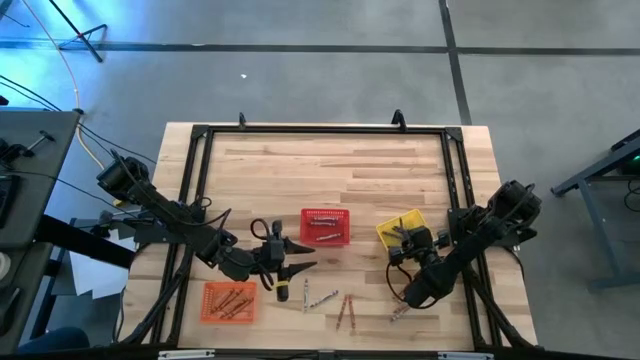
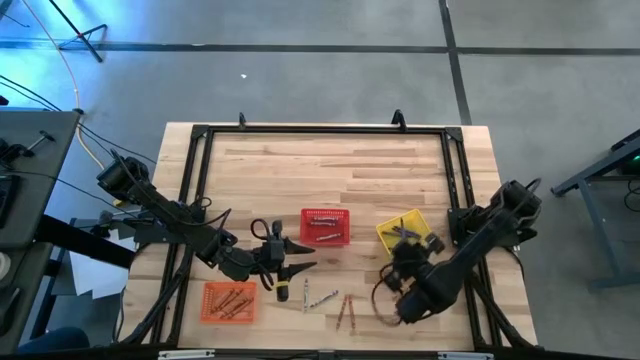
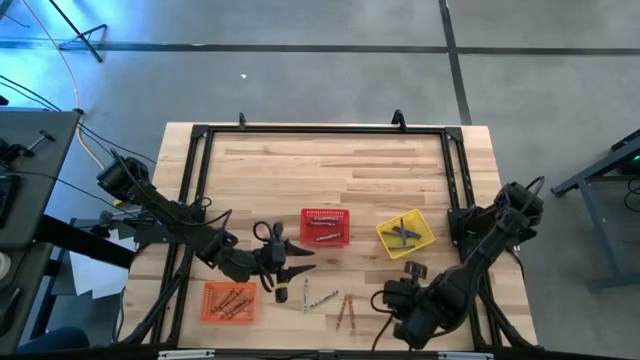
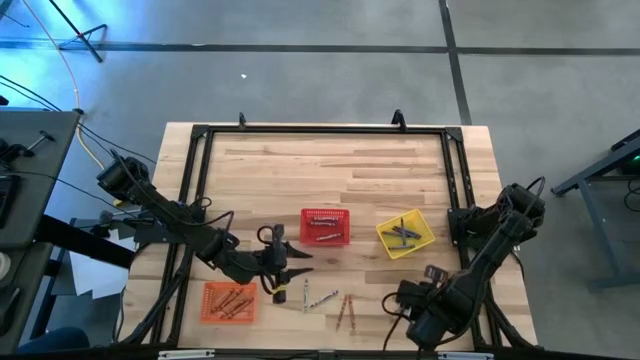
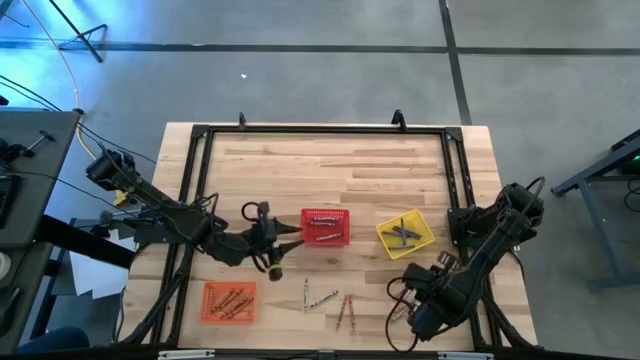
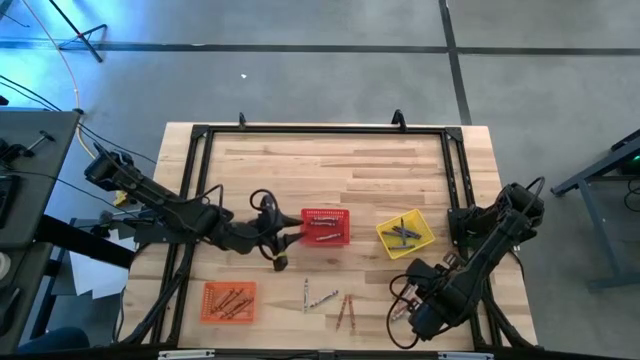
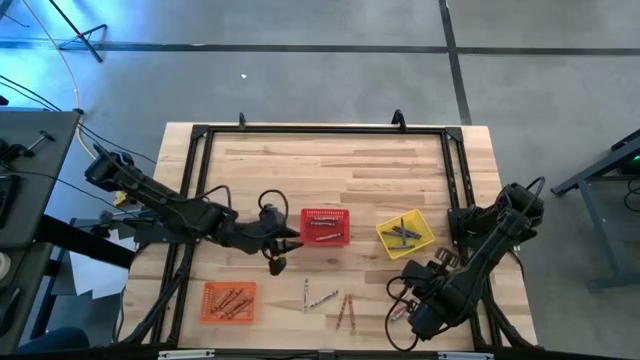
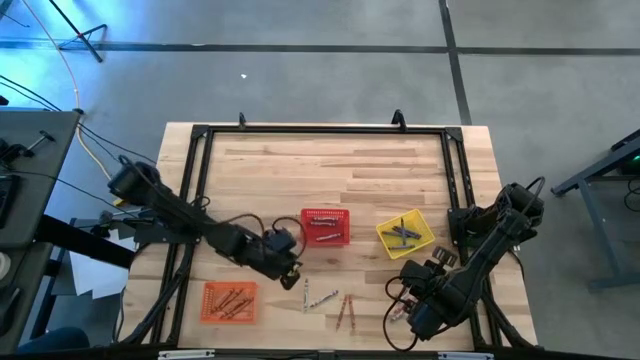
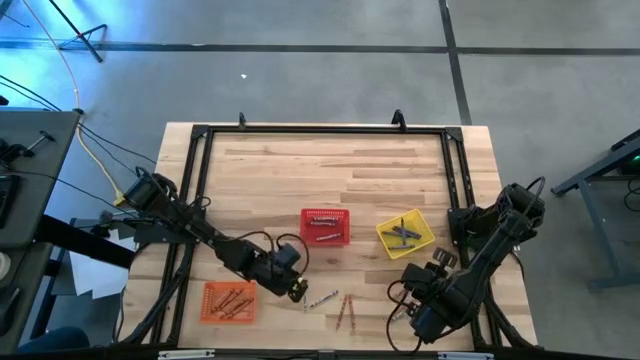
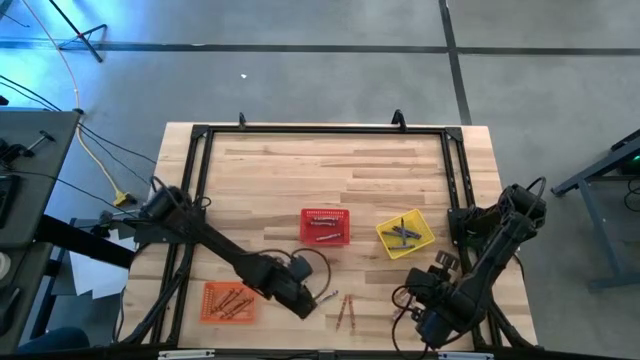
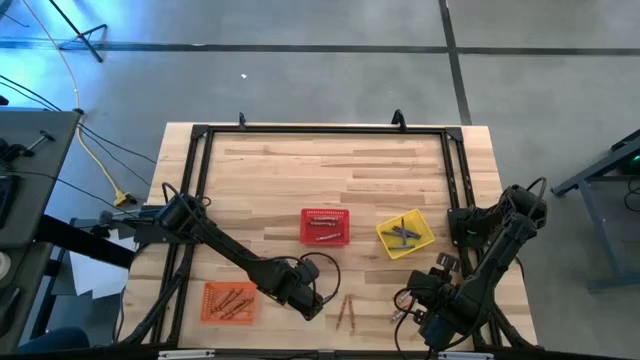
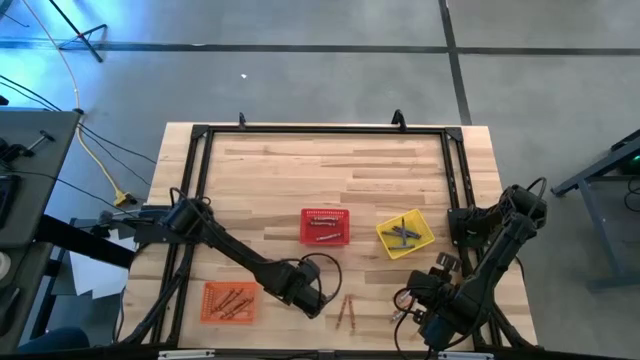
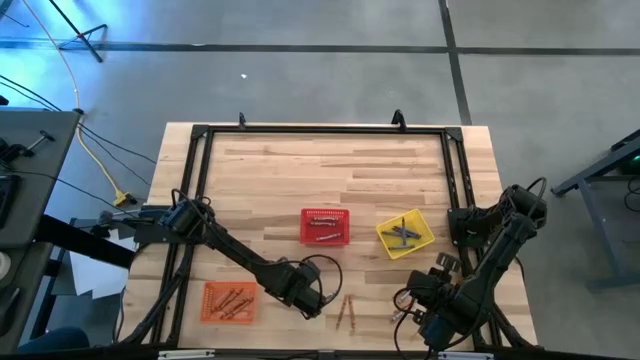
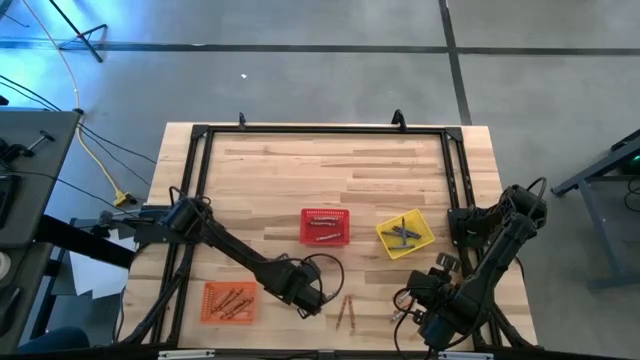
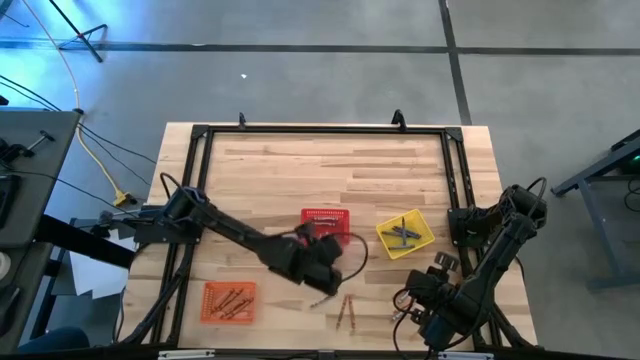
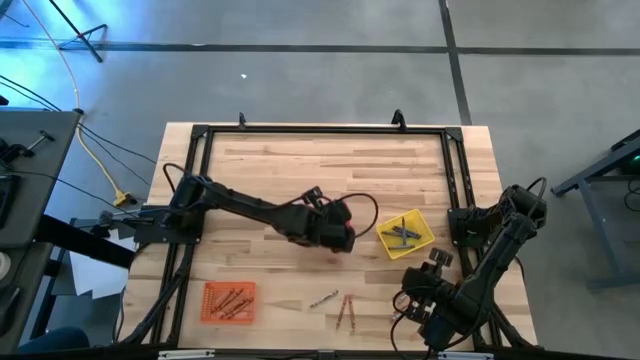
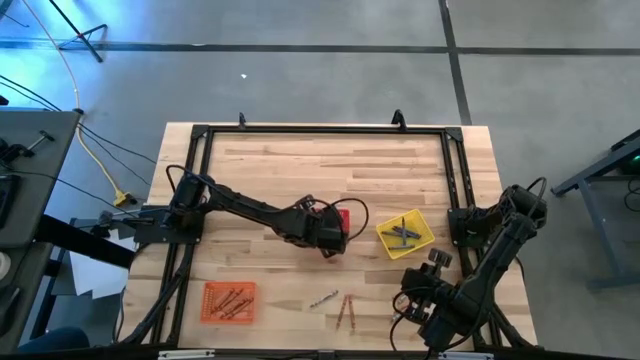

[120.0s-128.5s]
Task: Sort crayons
Put the gray crayon into the red bin

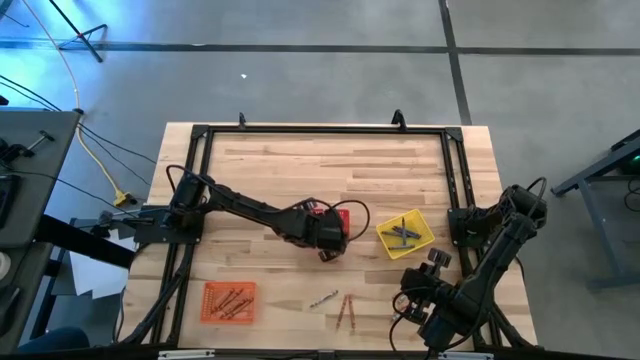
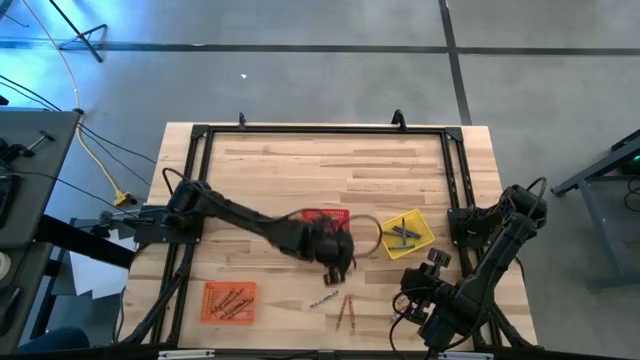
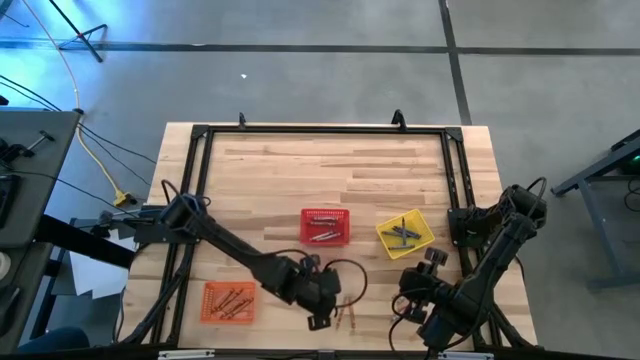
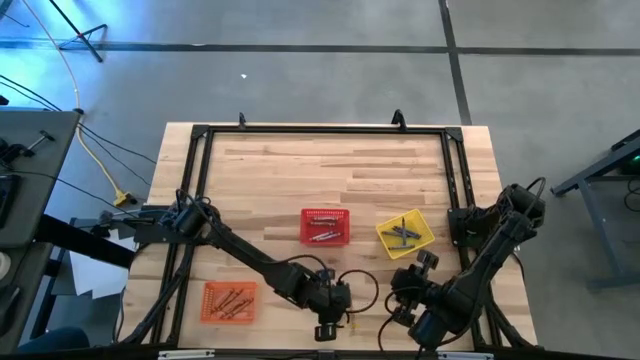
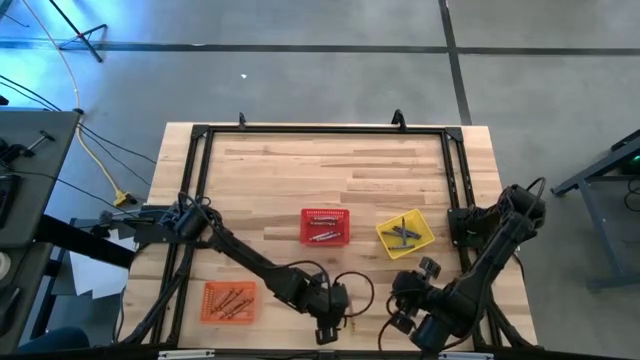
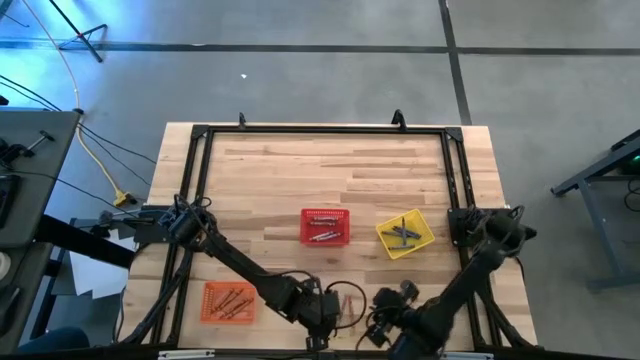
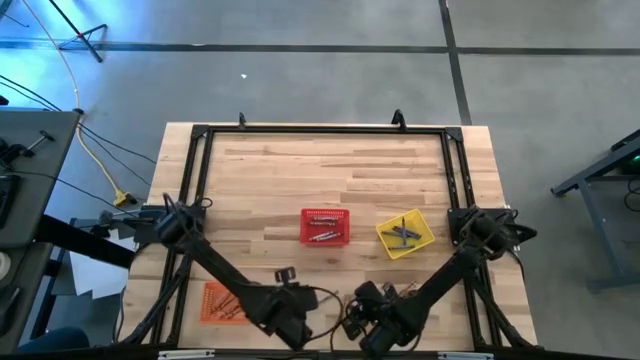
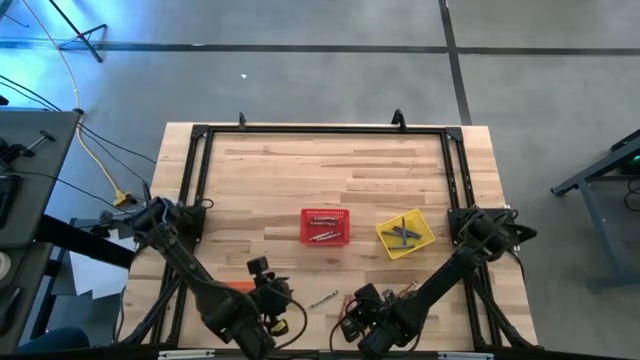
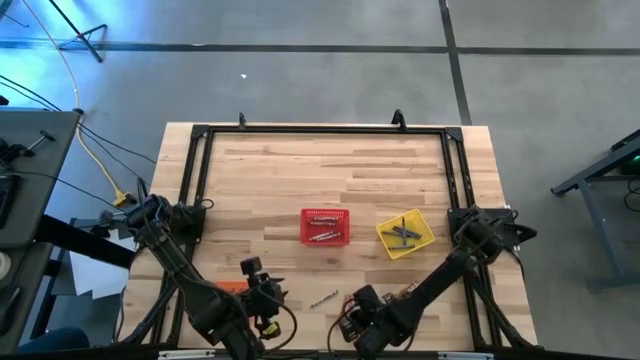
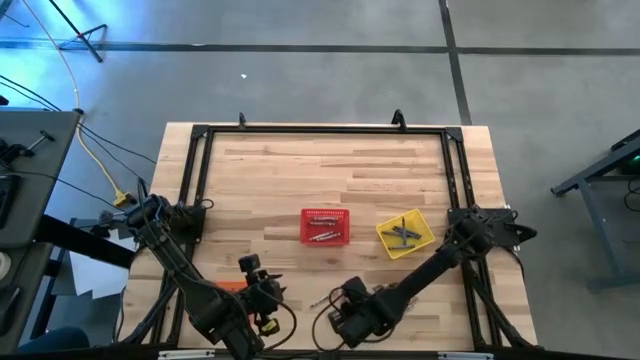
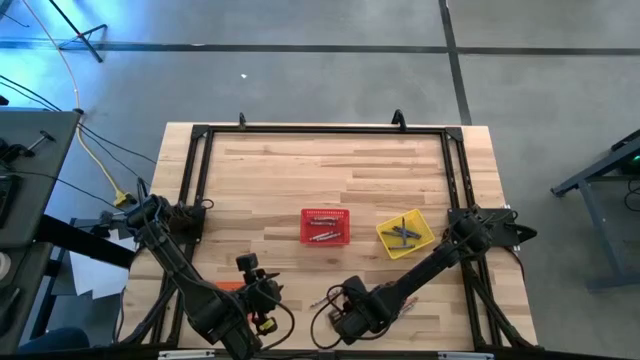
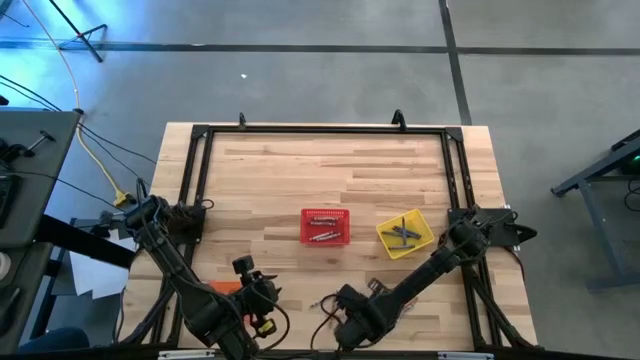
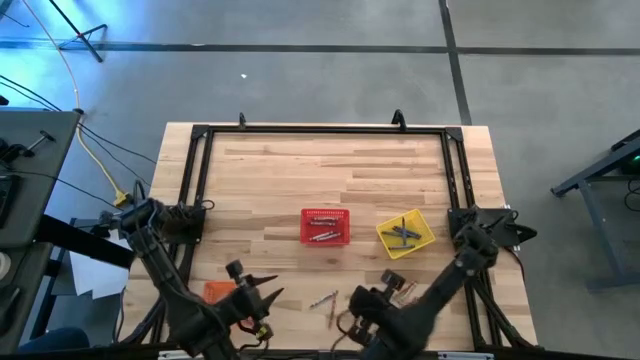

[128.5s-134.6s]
Put the orange crayon into the orange bin

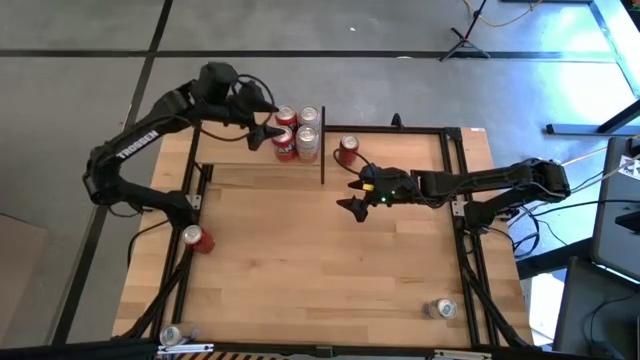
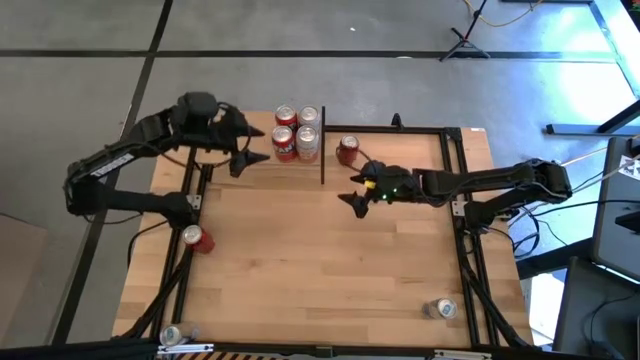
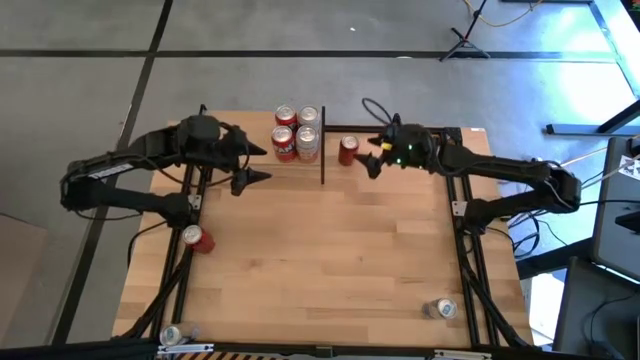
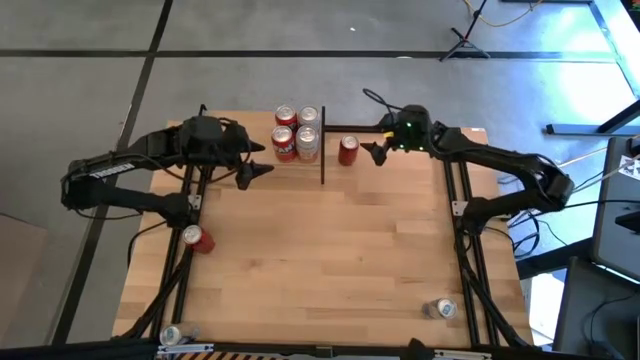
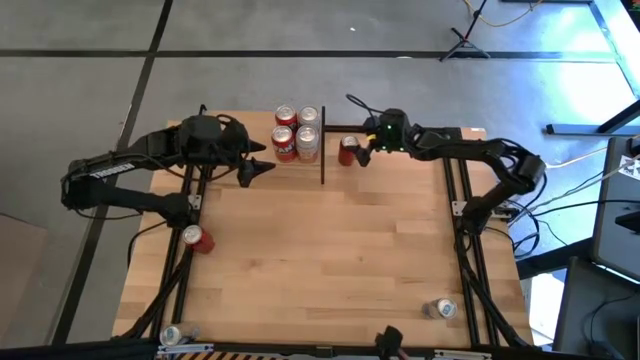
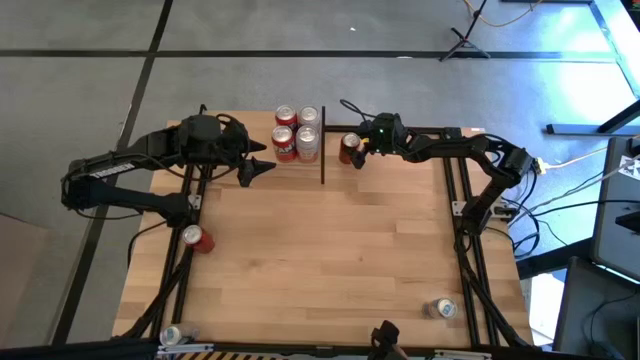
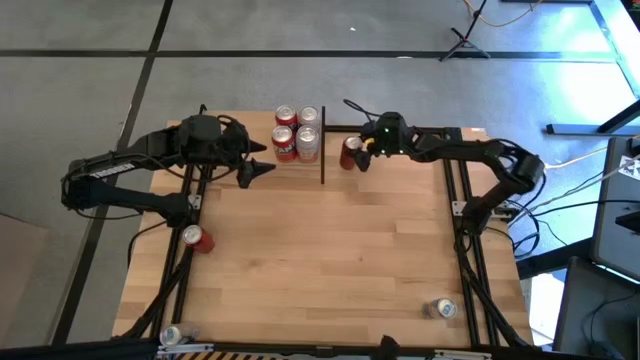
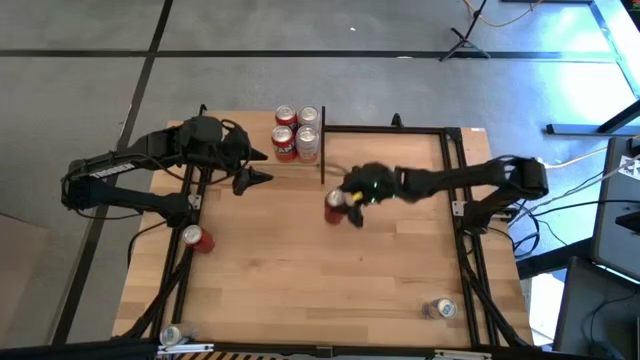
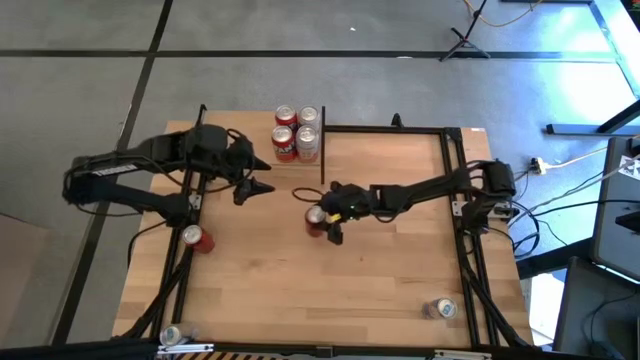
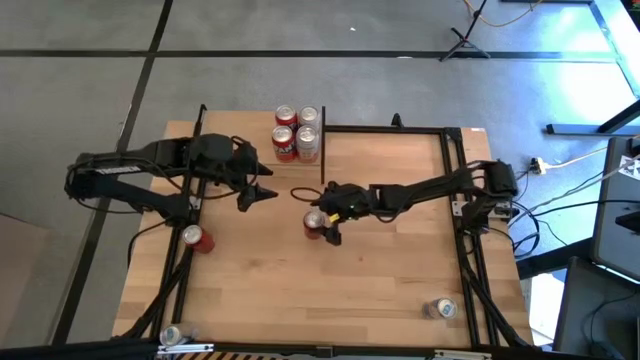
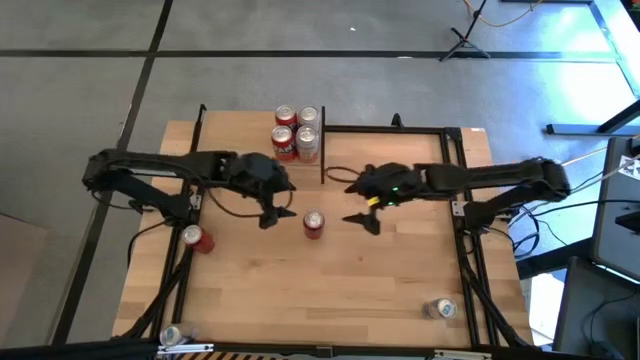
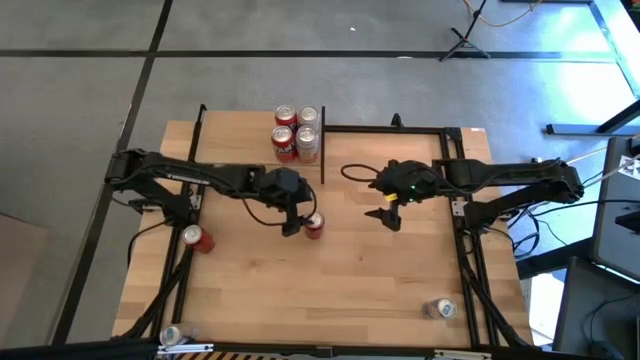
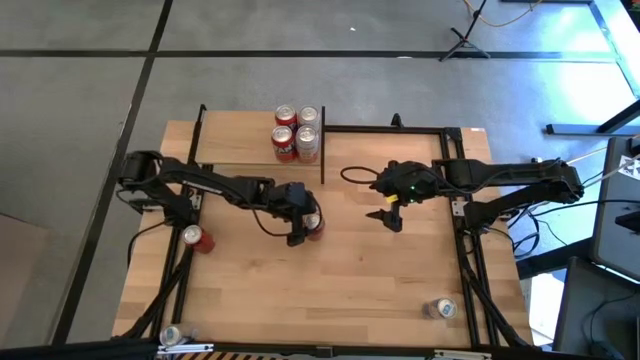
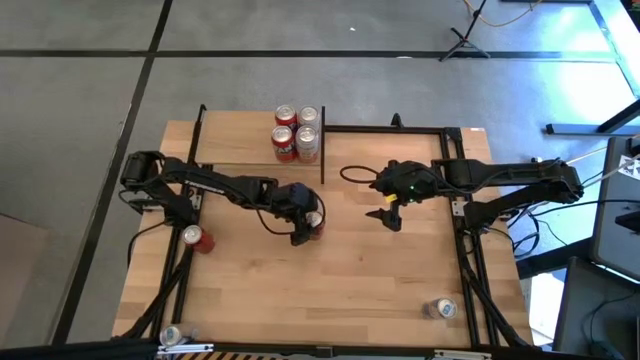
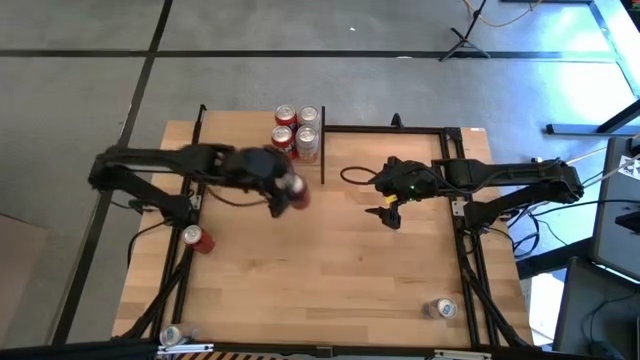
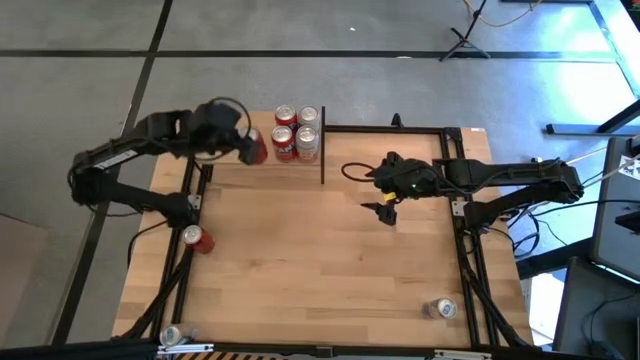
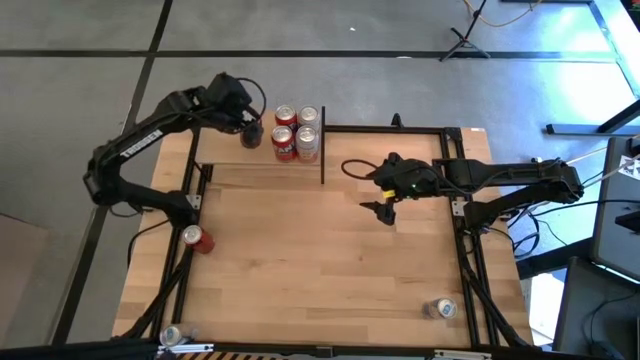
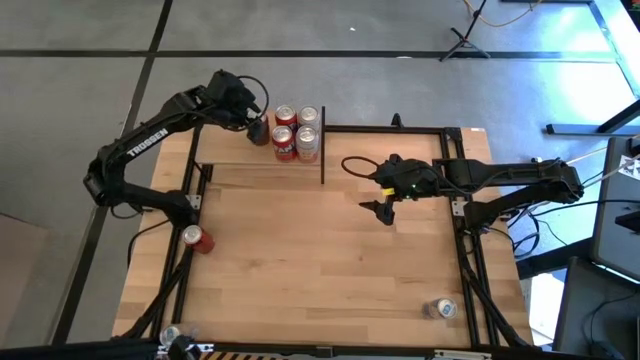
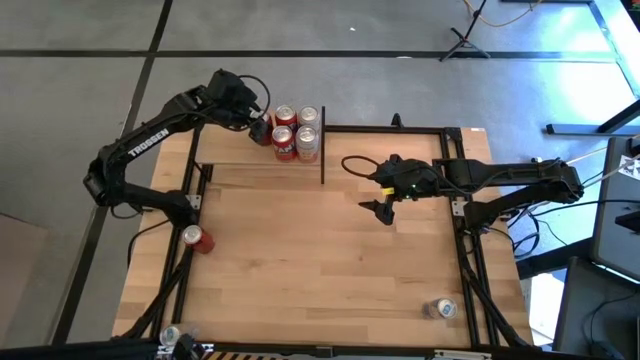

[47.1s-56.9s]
Task: Place canned beverage on shelf
Put the top red soda can on the shelf
